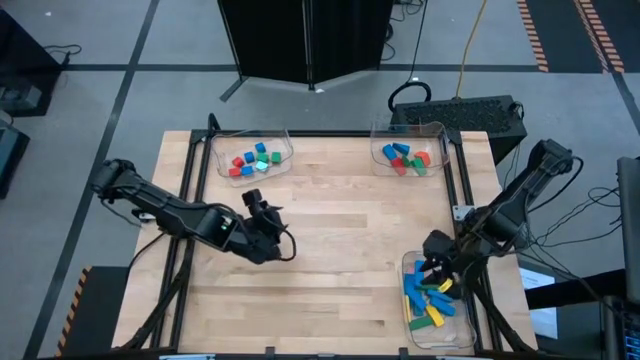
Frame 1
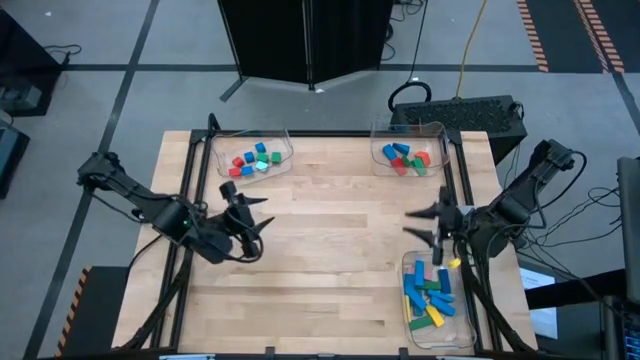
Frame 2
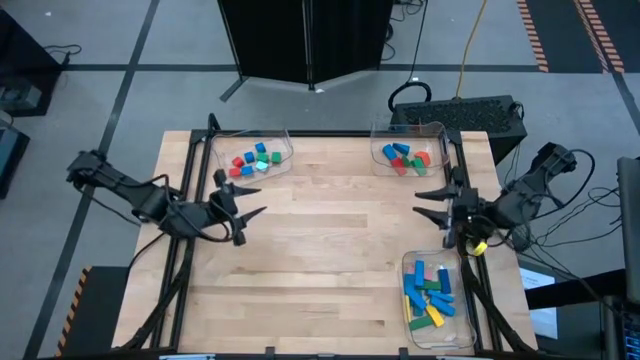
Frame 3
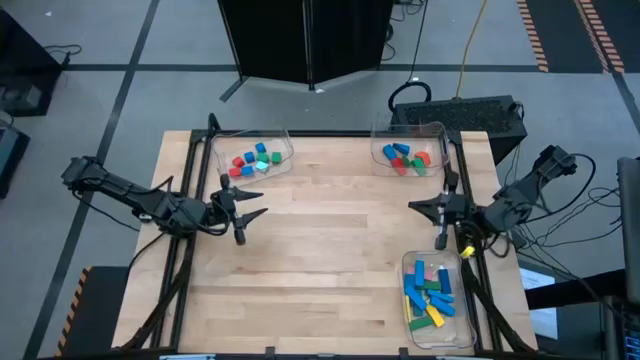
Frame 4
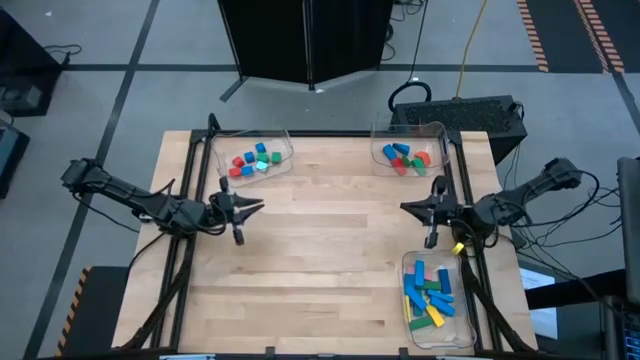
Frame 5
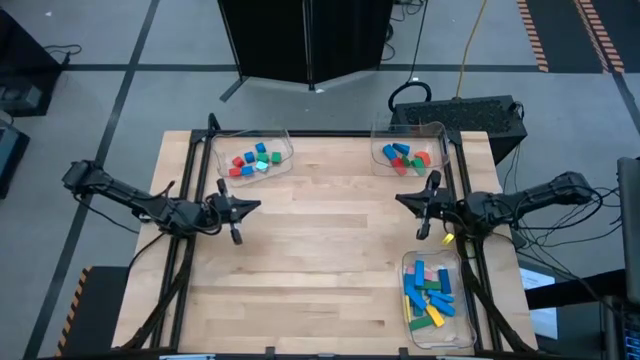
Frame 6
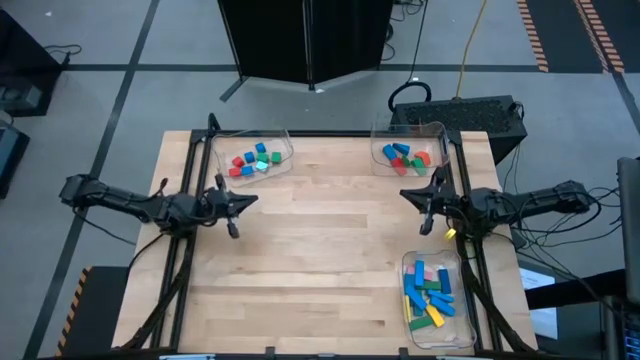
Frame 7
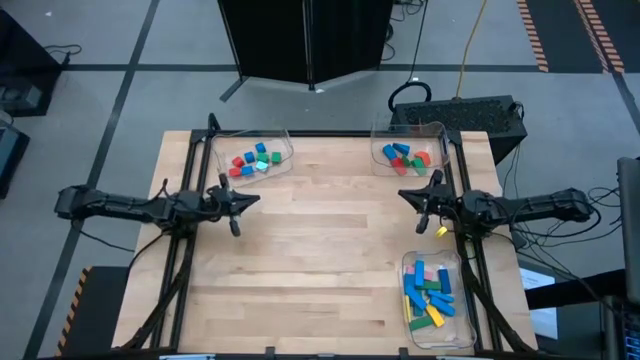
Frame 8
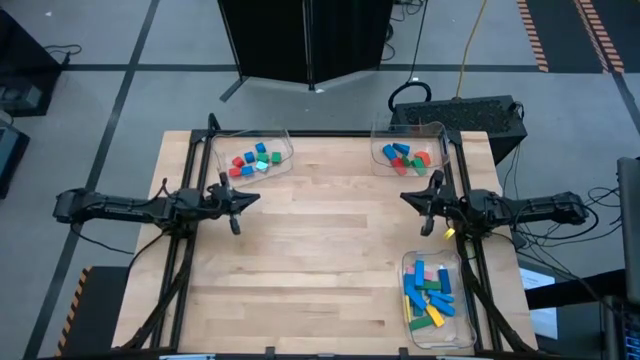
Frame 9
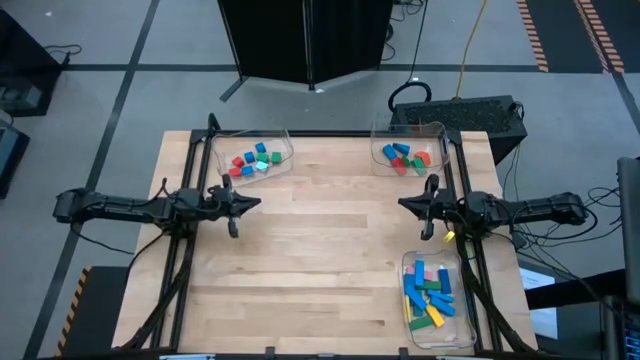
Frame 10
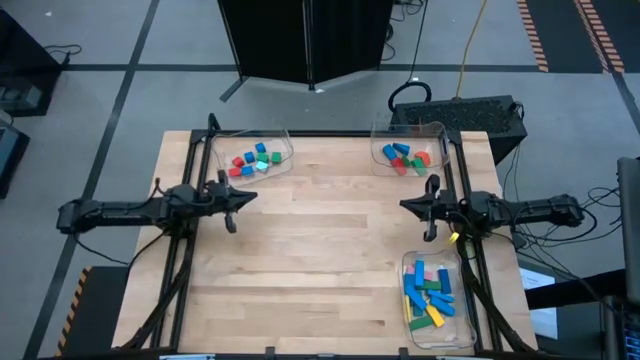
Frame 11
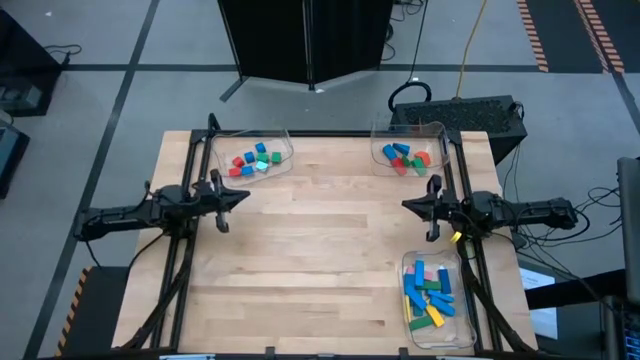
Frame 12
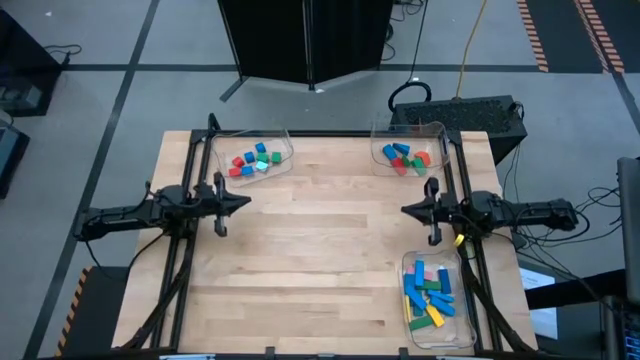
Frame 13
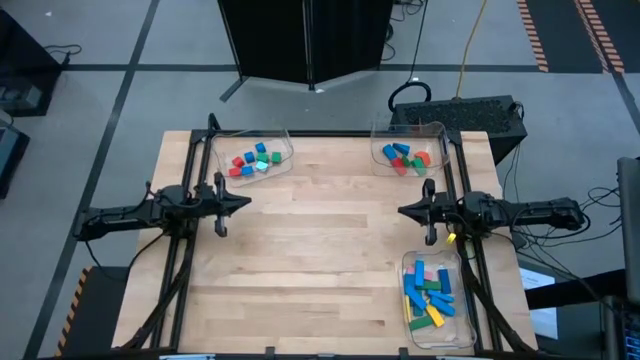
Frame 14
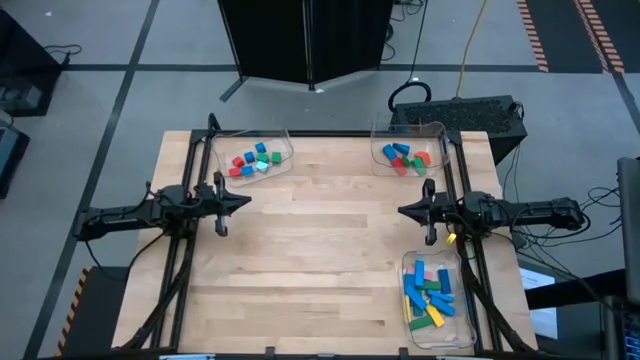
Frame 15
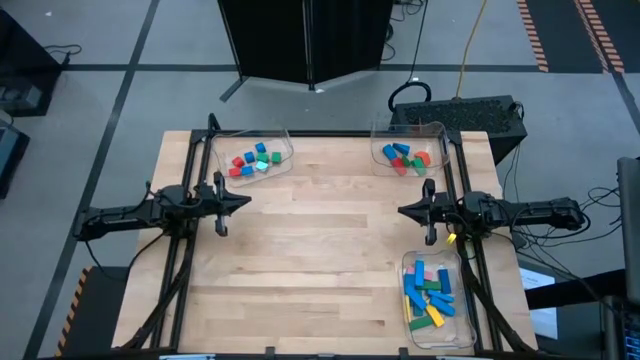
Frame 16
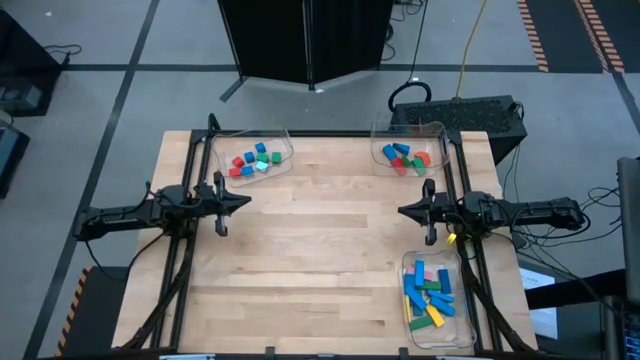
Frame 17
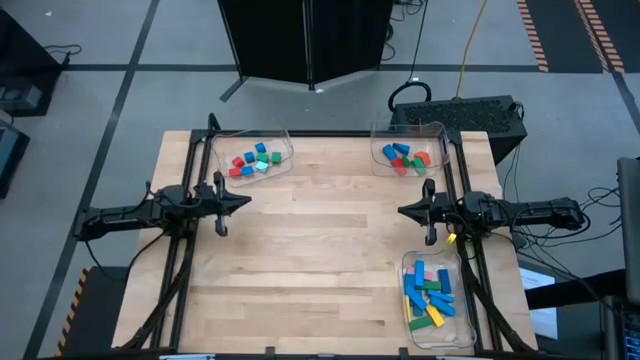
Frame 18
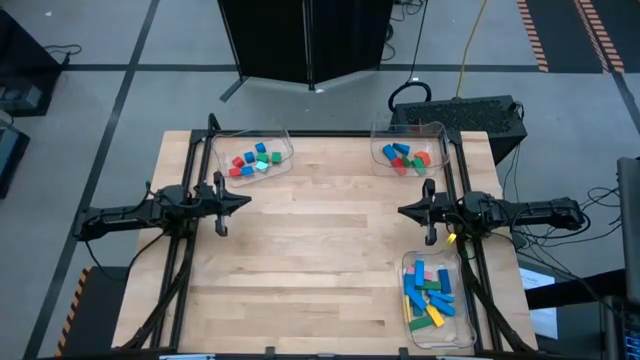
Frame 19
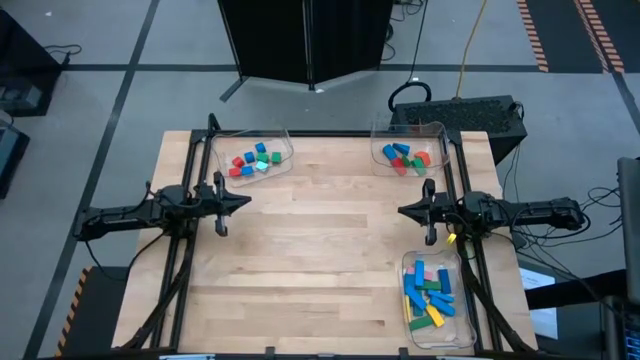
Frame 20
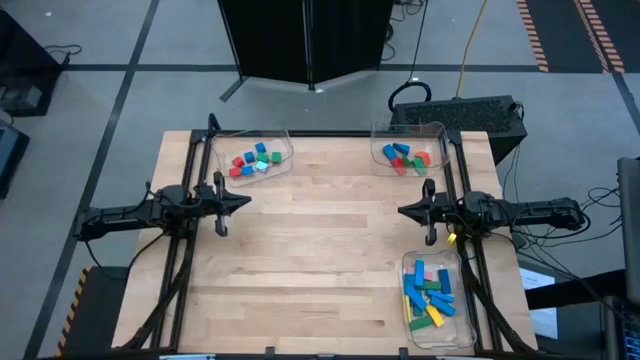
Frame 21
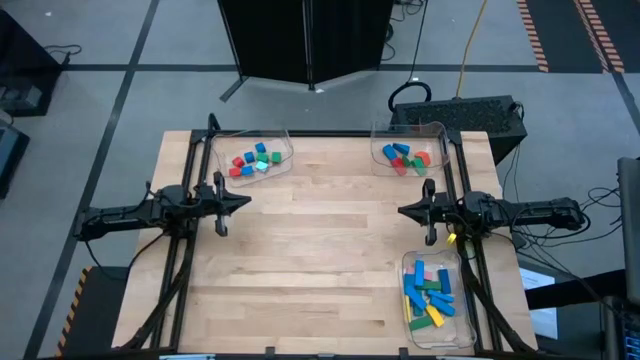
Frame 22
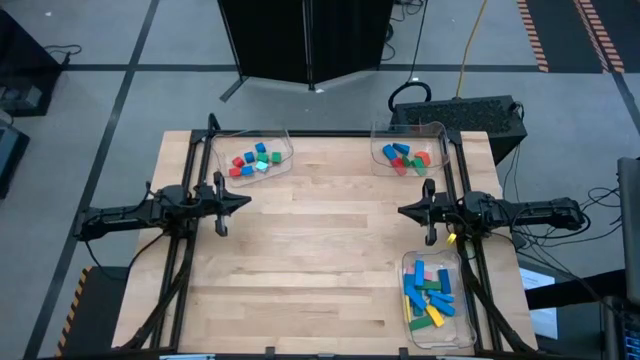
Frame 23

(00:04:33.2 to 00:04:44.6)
Task: Sort blocks by size
Return to Home Position

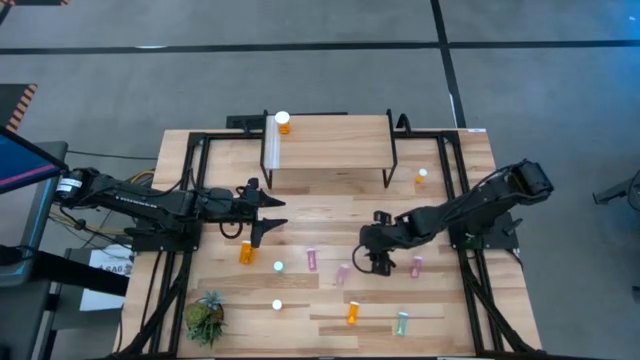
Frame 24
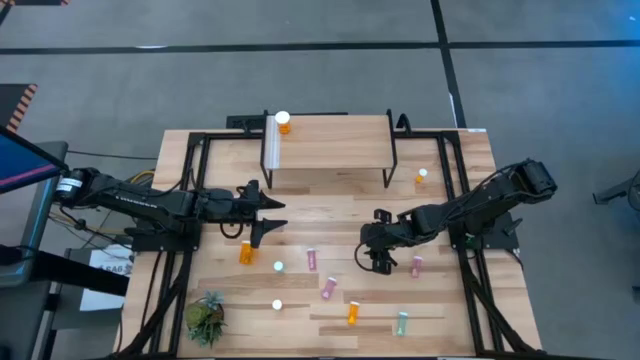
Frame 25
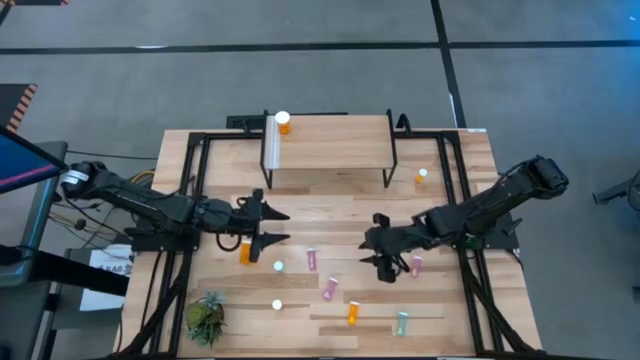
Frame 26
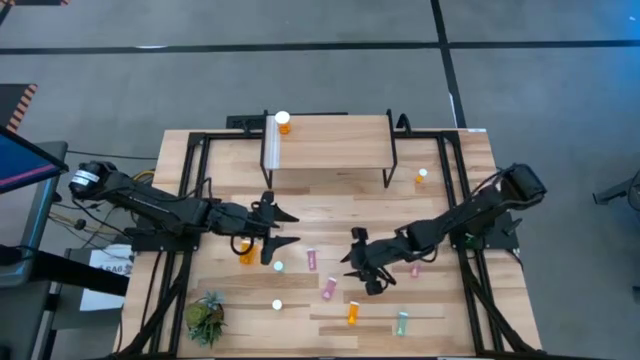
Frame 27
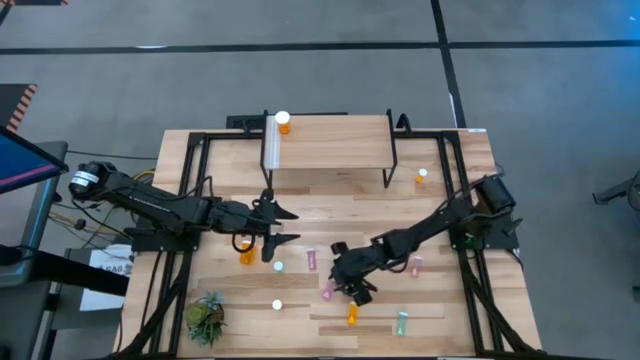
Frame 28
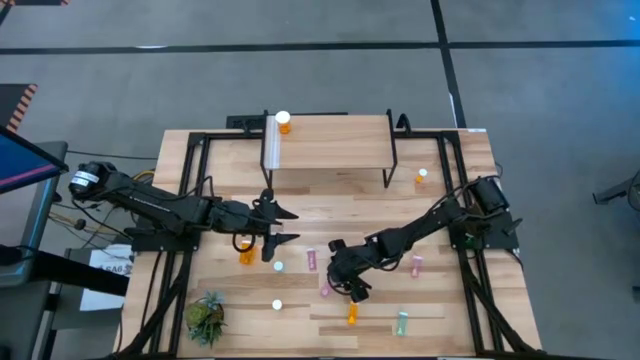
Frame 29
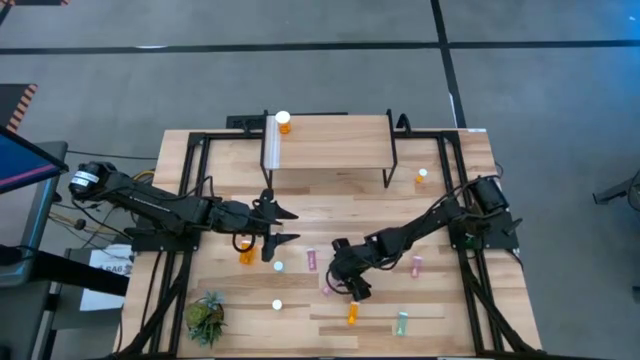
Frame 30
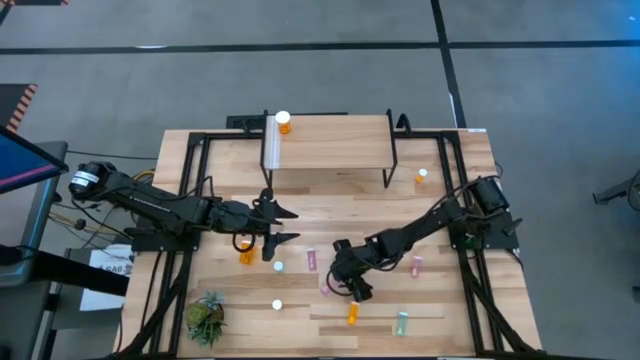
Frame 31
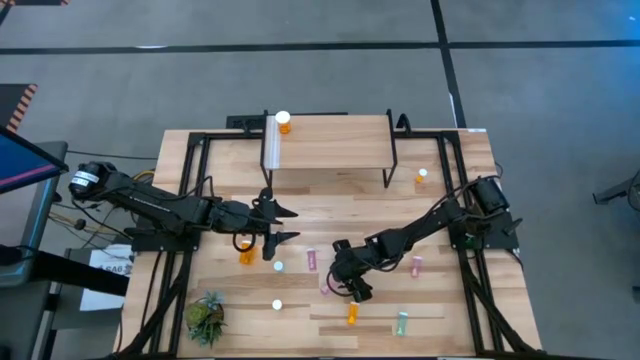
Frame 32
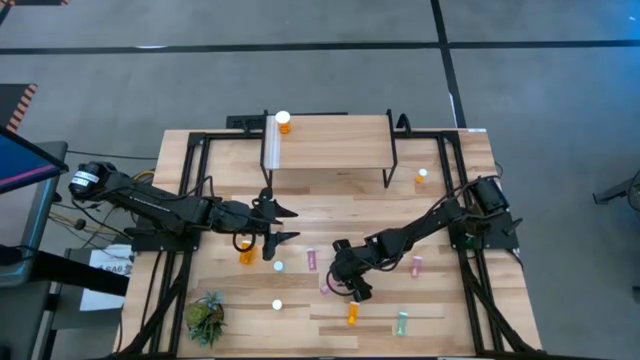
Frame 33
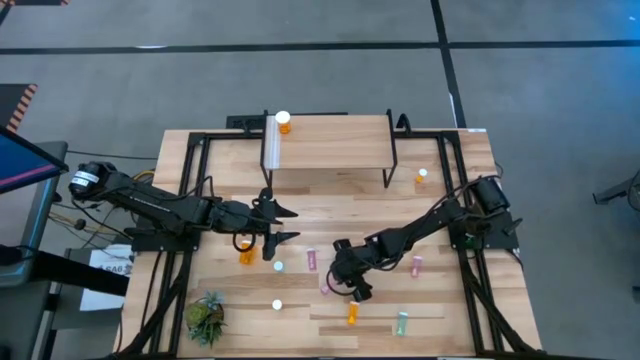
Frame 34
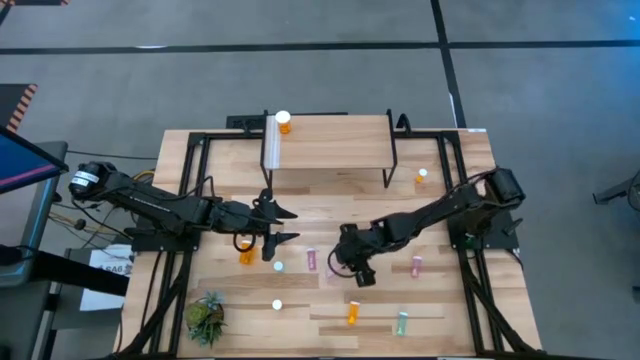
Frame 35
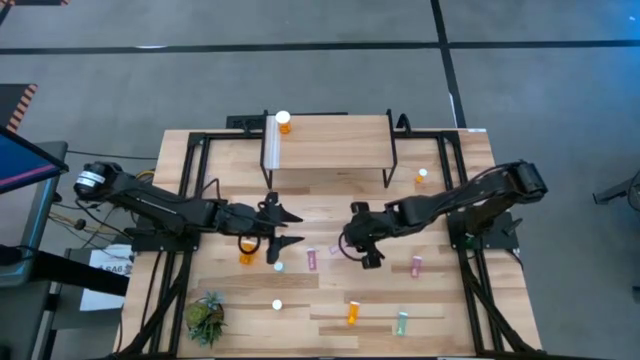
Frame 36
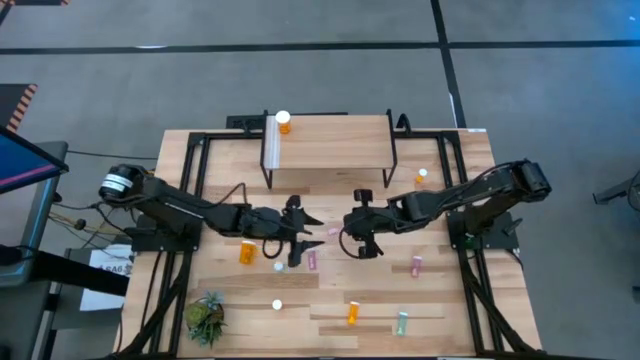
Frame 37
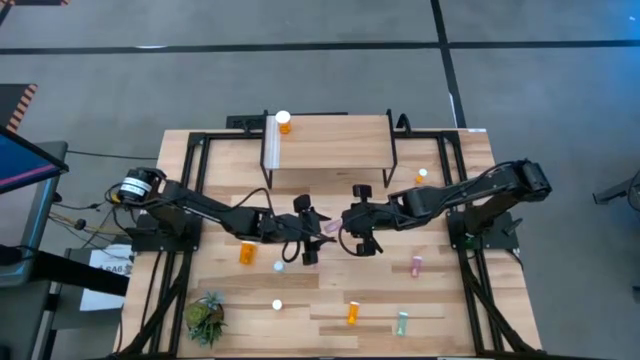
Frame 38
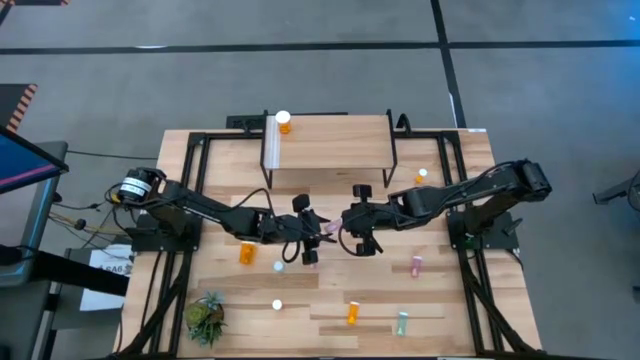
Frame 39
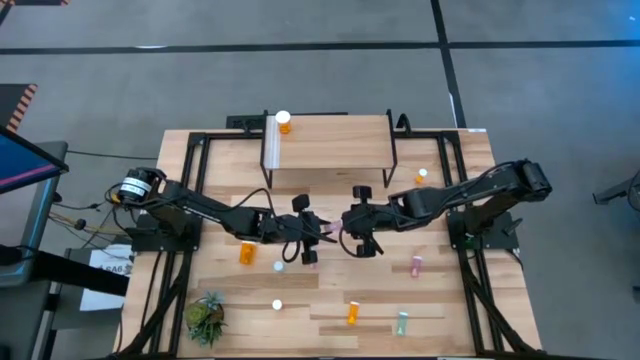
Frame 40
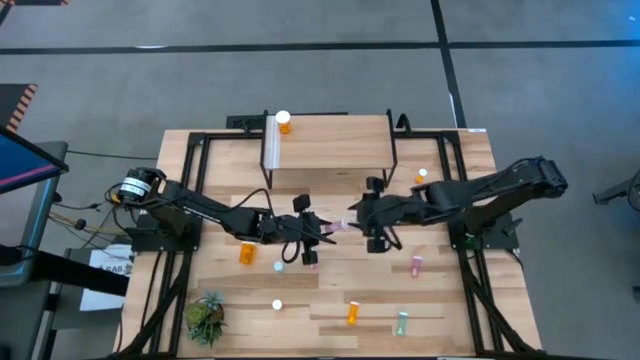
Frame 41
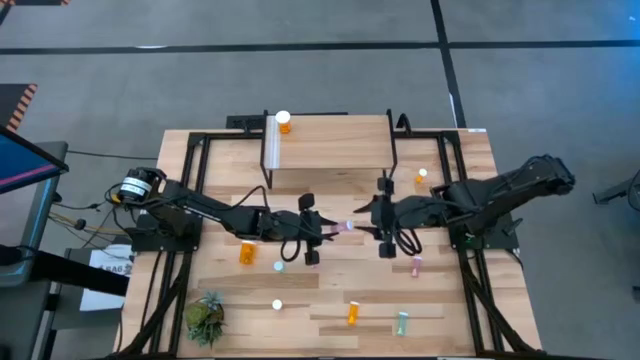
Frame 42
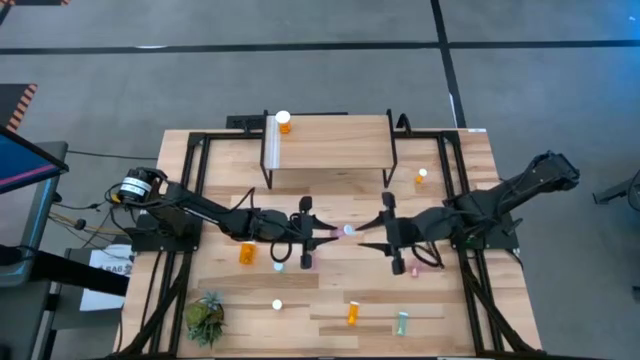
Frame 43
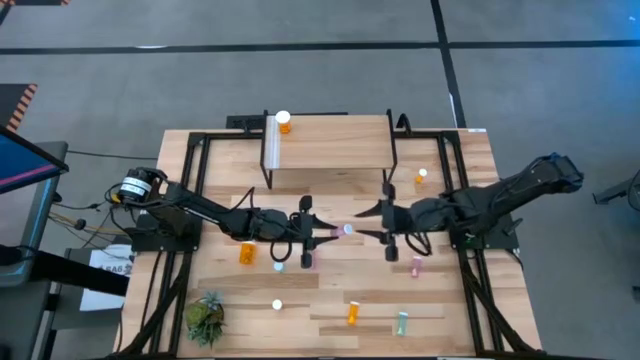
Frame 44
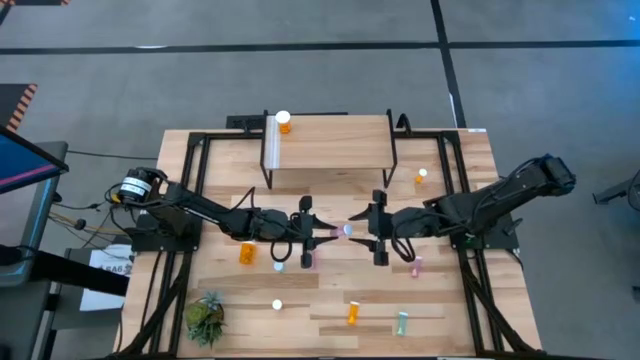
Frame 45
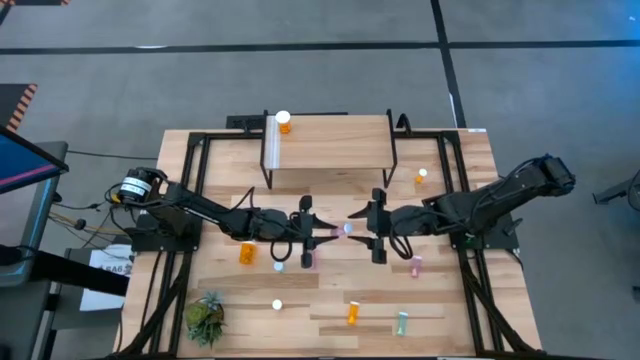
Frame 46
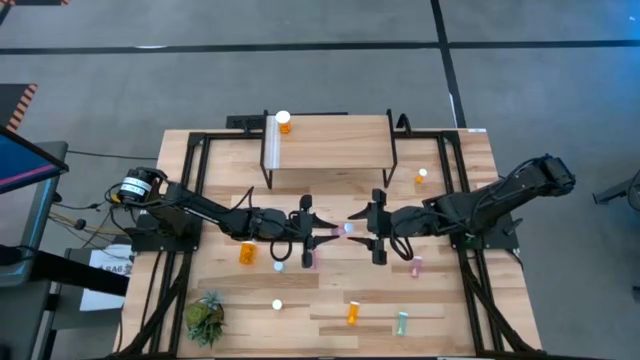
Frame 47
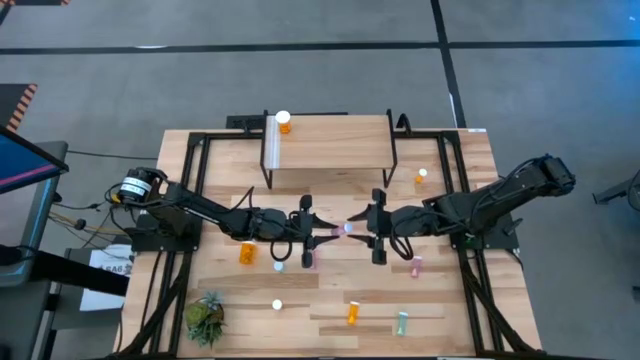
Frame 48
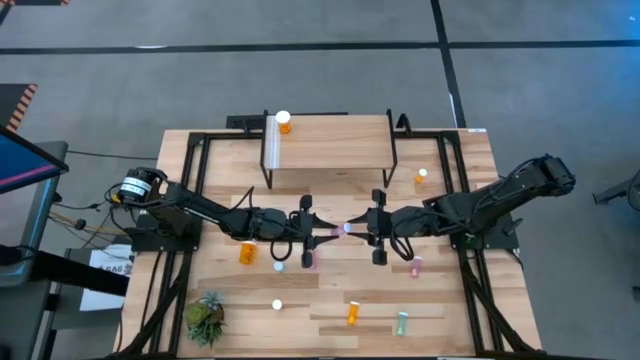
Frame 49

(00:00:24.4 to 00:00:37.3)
Task: Pick and place medicine bottles onto shelf by color
Put the middle pink pill bottle on the shelf
